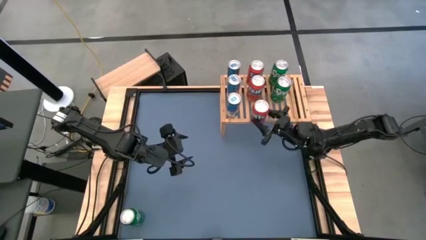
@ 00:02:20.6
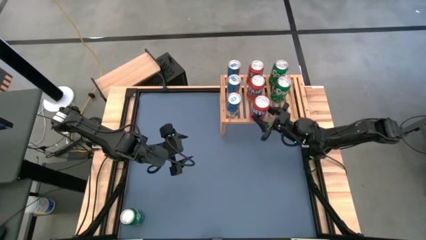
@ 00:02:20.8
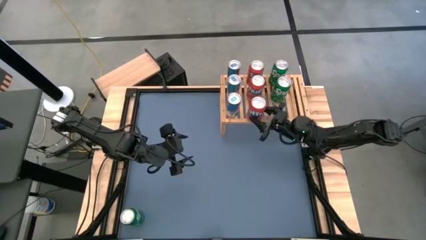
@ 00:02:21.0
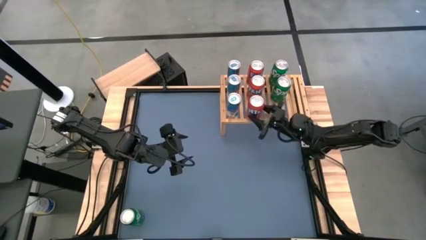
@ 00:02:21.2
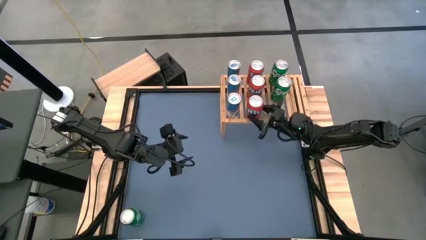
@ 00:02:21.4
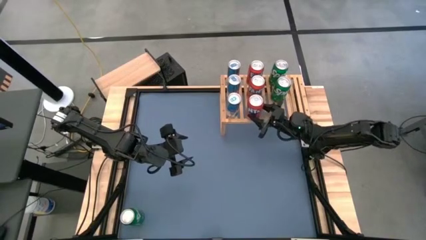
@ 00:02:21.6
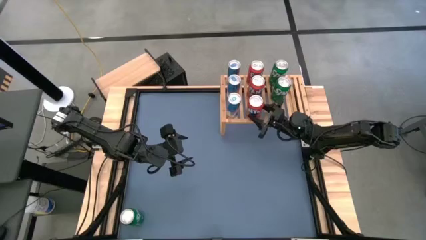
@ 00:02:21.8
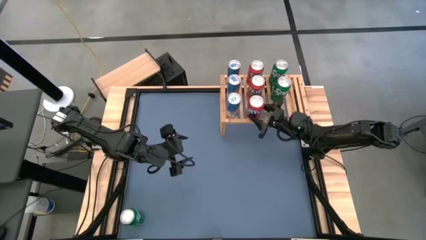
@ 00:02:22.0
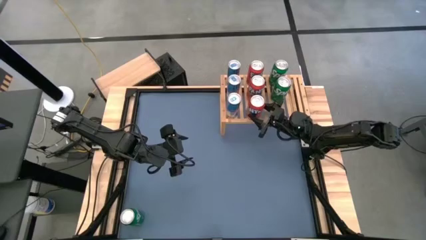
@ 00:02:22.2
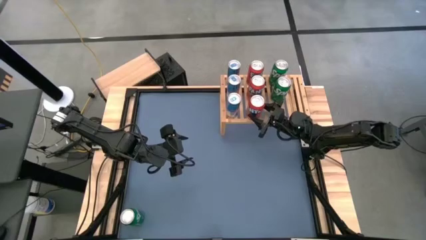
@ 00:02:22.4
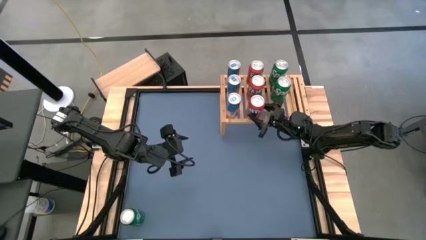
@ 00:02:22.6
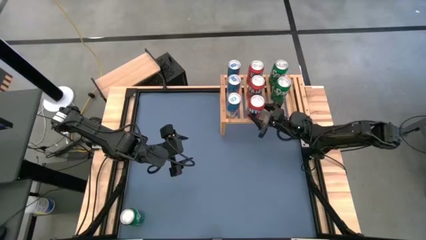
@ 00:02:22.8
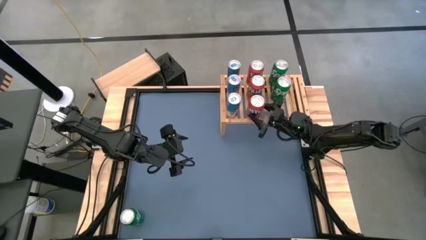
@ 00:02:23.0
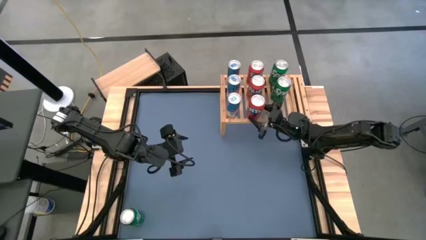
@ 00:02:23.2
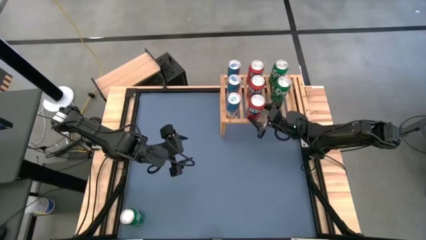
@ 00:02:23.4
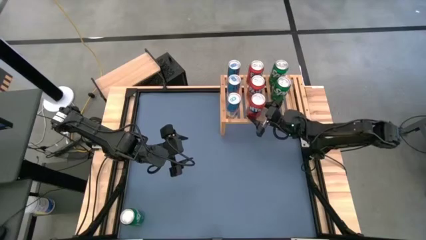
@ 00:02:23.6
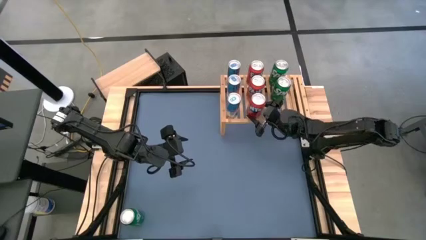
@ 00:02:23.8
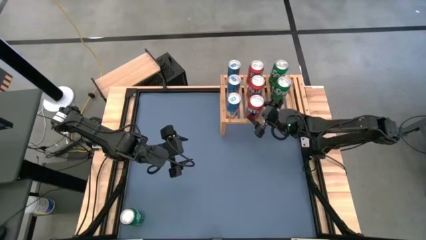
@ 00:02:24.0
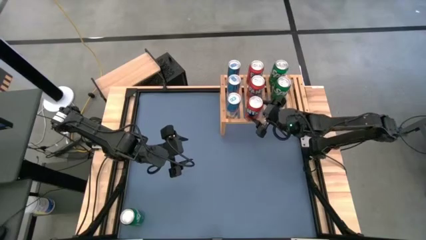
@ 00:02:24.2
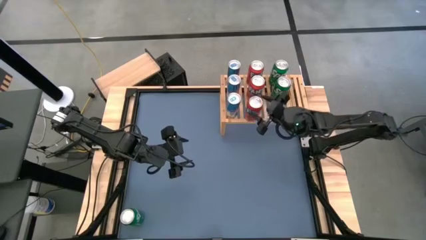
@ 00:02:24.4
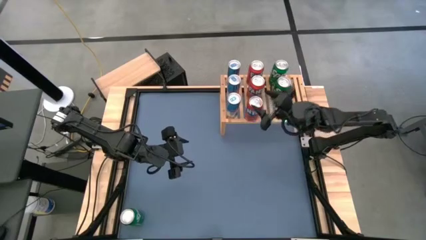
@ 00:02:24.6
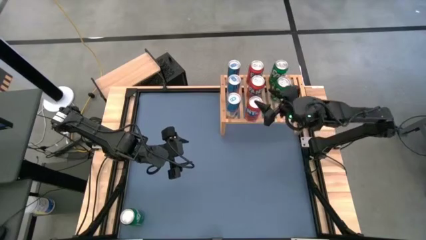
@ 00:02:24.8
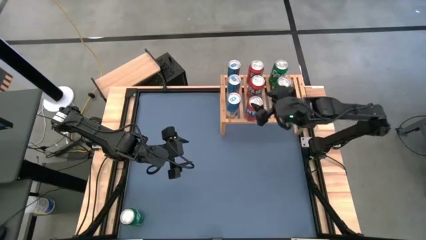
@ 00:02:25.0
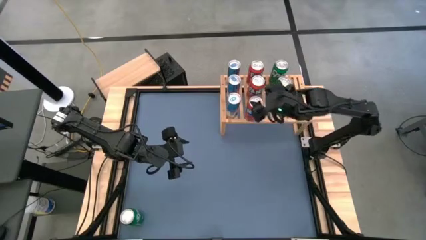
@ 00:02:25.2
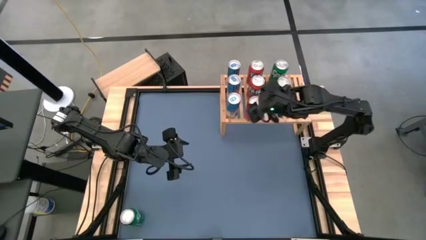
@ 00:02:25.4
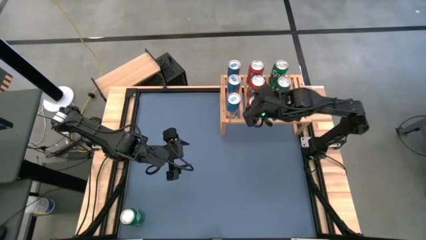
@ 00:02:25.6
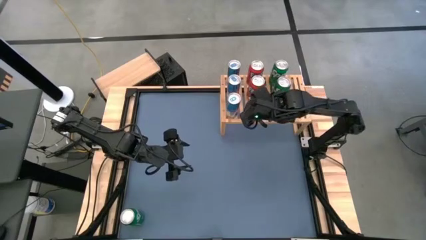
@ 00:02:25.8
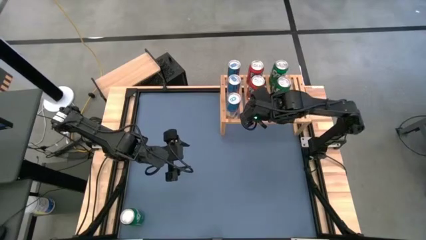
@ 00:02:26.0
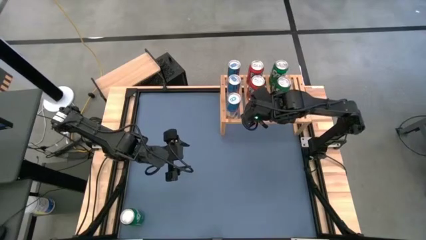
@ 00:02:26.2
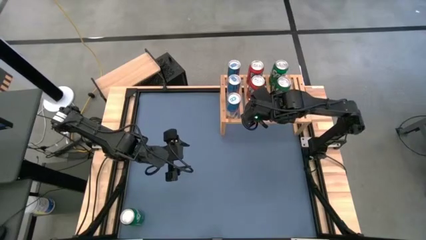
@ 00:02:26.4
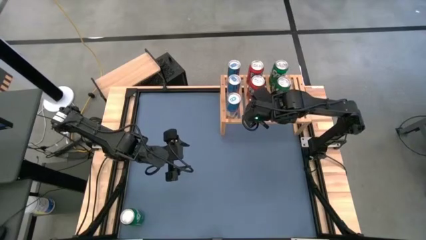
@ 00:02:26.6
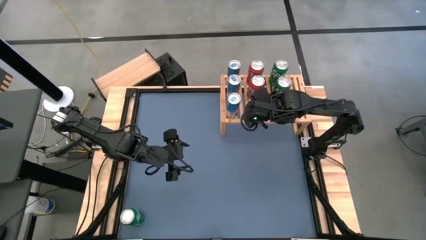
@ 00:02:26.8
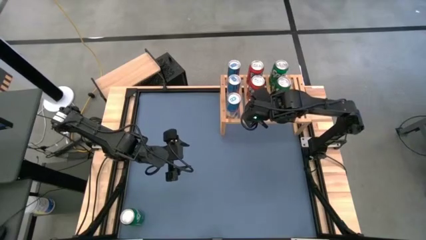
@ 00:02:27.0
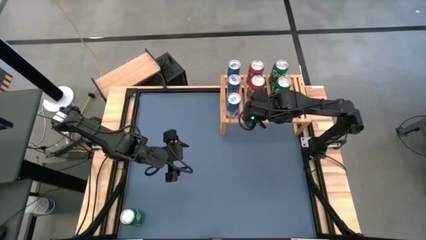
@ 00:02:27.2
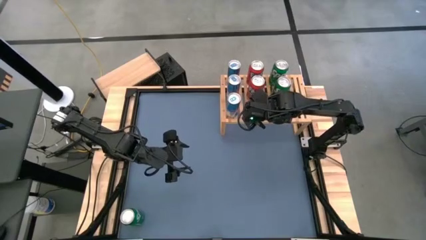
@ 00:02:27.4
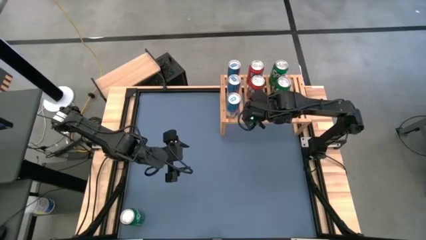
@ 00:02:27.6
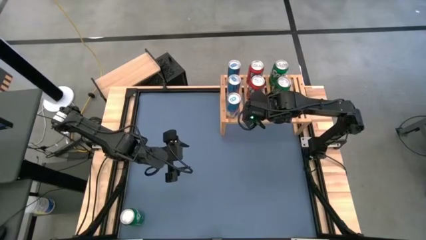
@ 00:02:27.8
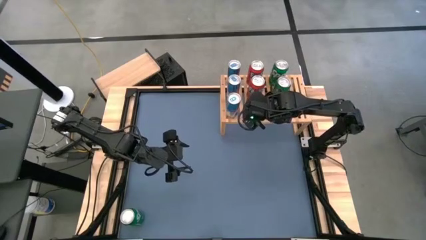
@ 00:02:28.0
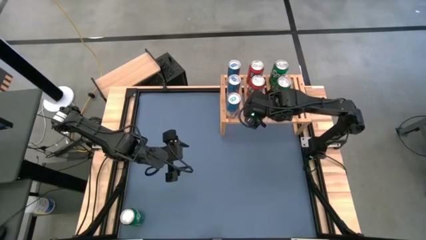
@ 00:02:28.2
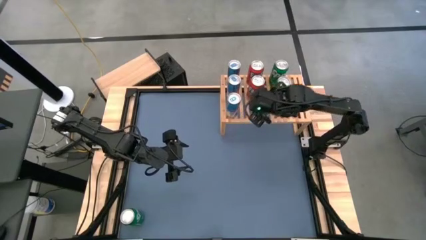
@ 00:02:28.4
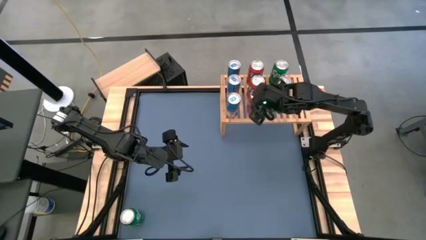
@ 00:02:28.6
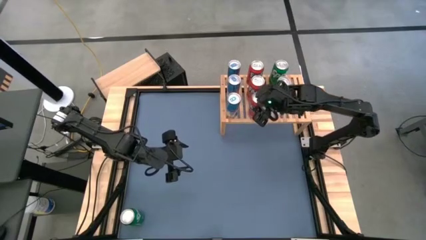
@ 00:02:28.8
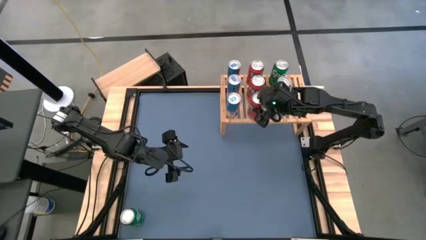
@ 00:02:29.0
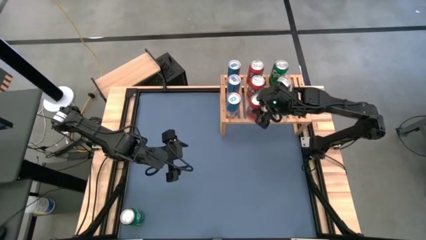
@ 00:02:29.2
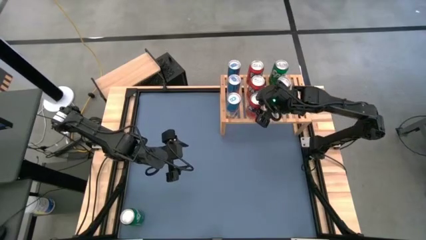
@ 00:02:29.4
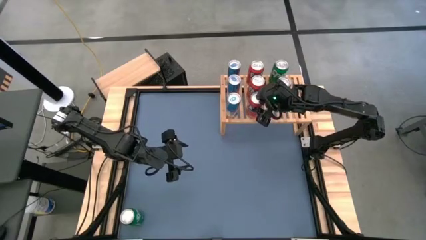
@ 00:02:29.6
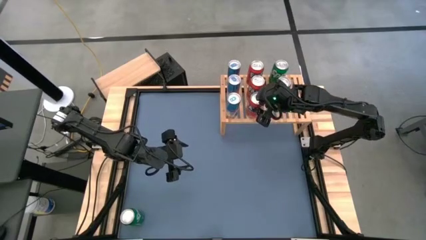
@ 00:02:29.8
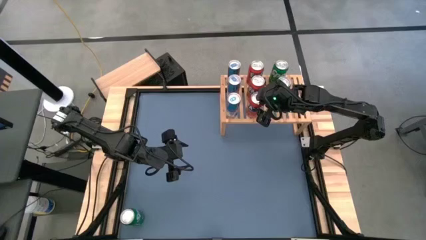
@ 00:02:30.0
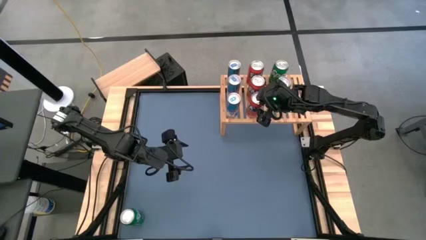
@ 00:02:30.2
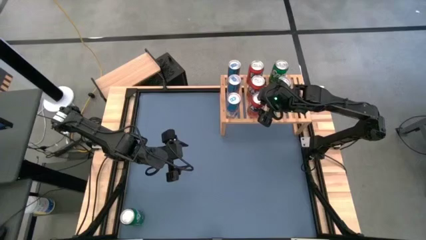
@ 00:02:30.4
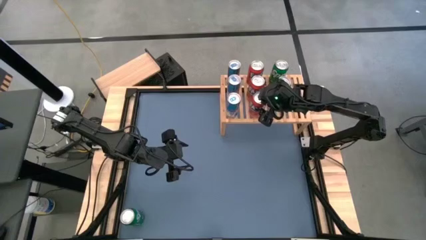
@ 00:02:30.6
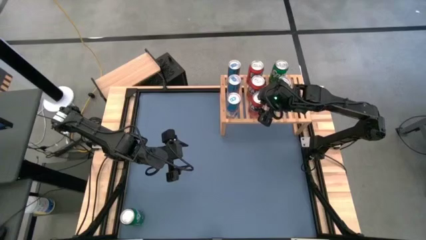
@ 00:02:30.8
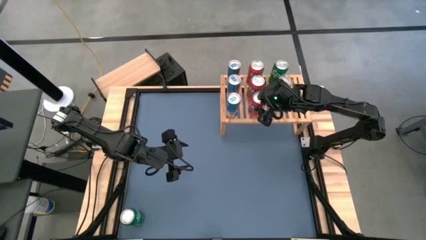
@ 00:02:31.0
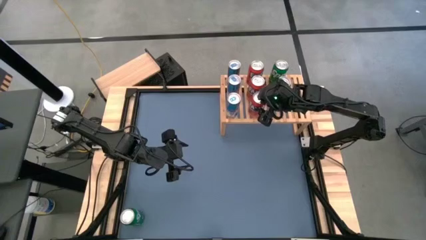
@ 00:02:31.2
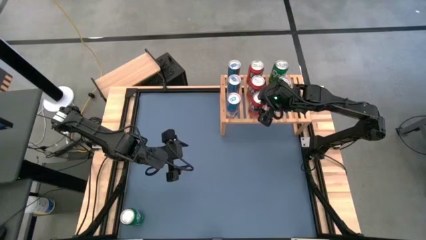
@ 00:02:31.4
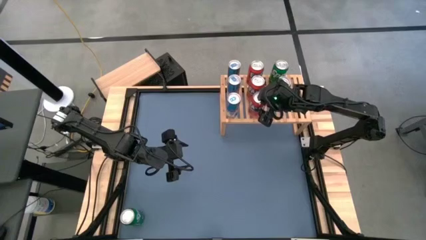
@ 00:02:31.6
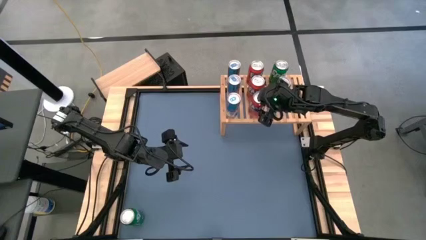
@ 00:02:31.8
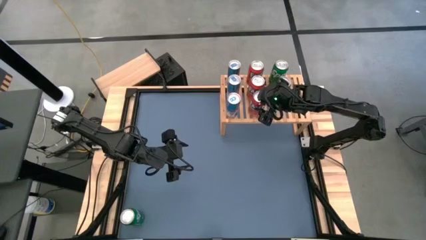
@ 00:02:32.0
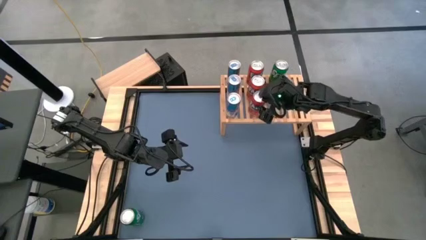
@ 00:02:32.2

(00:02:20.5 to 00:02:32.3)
Task: Place canned beverage on shelf
Put the red soda can on the shelf aligned with the other red soda can
